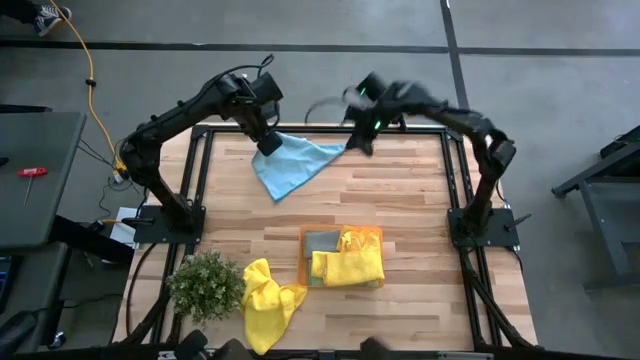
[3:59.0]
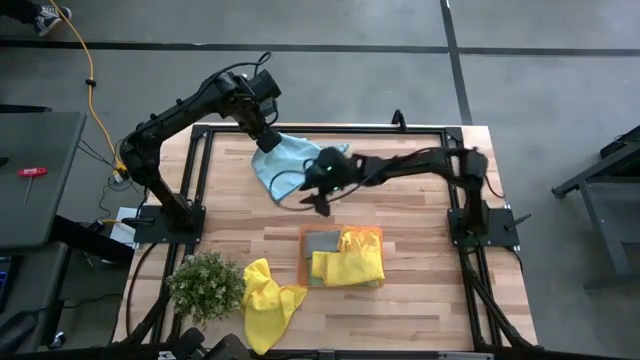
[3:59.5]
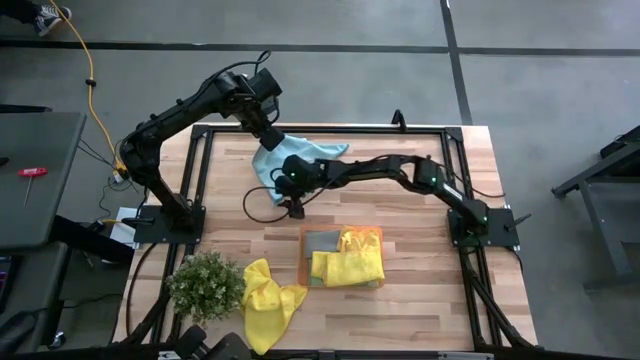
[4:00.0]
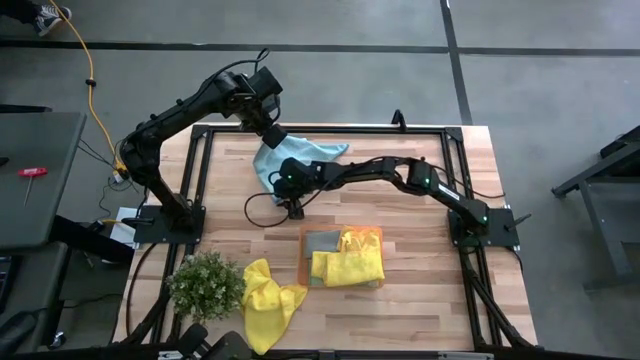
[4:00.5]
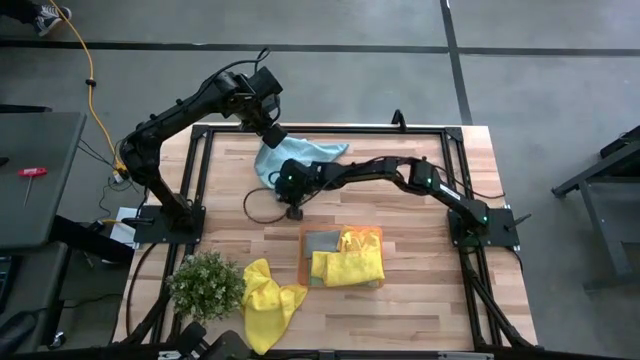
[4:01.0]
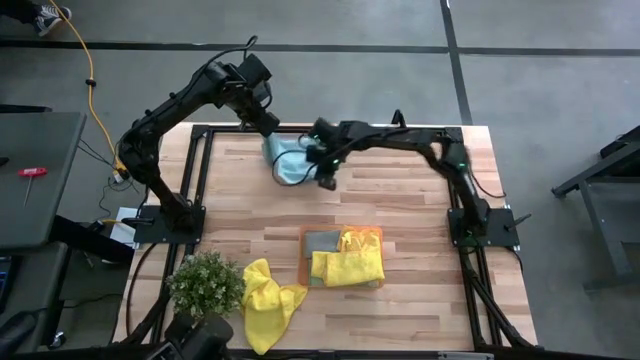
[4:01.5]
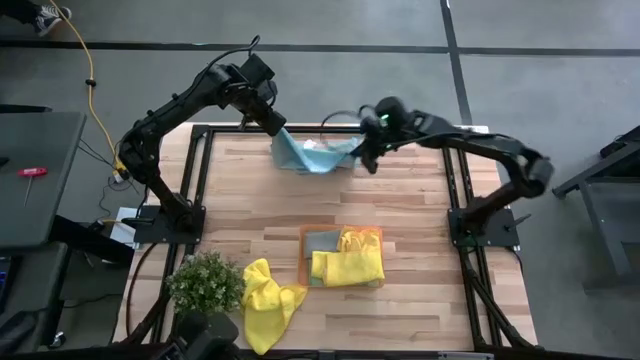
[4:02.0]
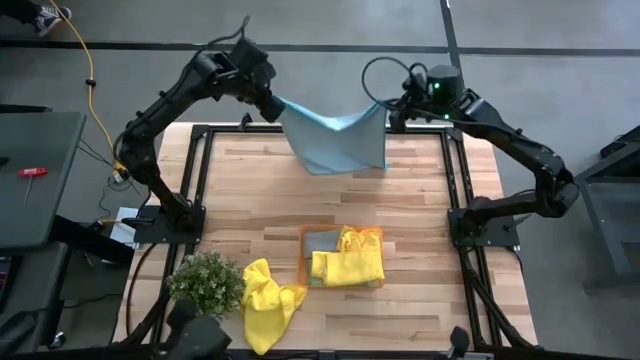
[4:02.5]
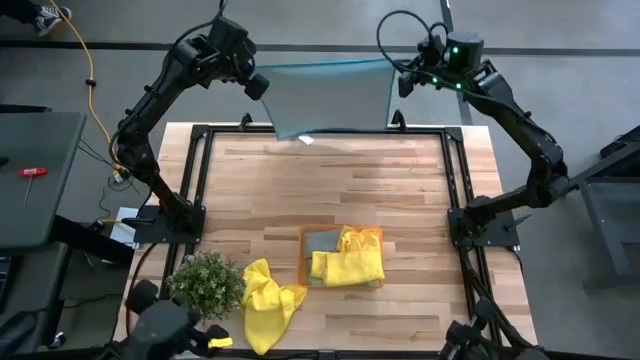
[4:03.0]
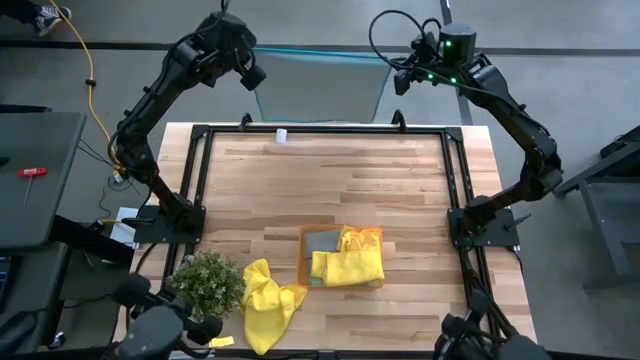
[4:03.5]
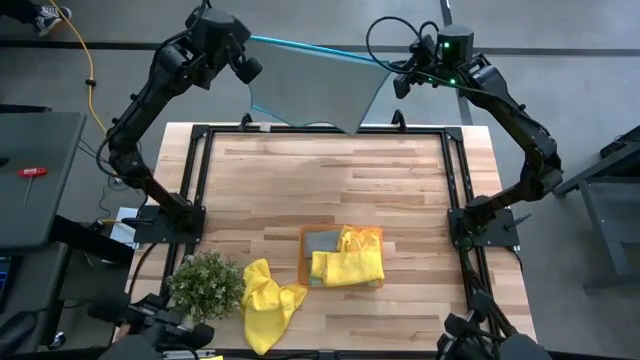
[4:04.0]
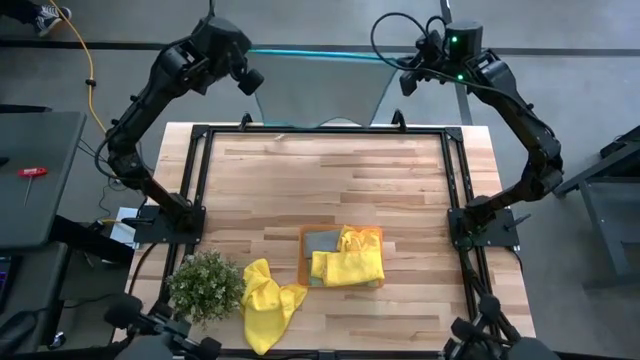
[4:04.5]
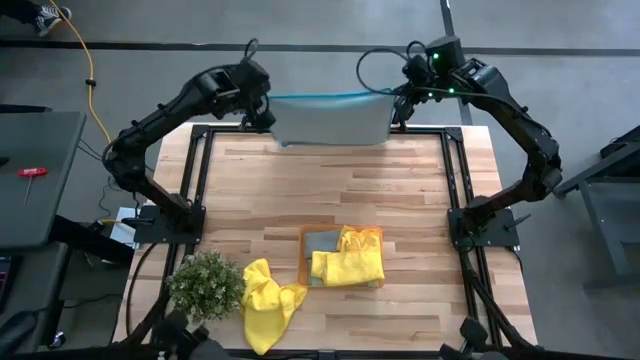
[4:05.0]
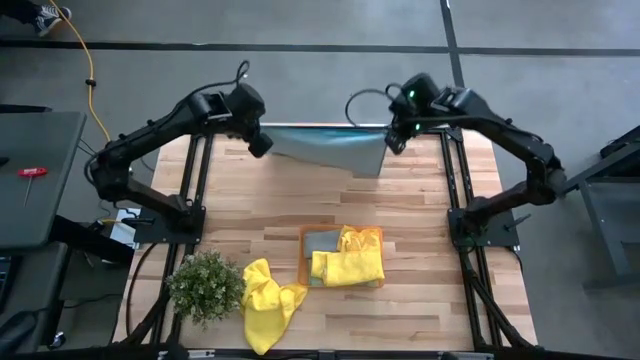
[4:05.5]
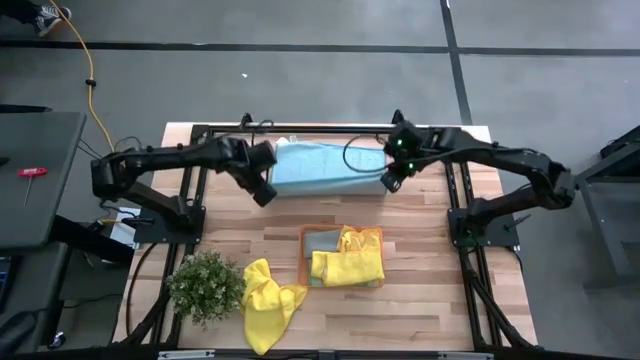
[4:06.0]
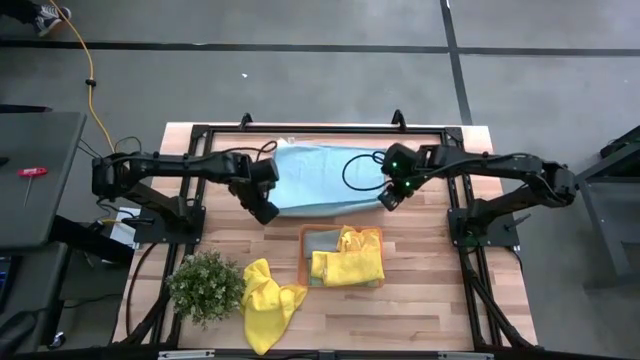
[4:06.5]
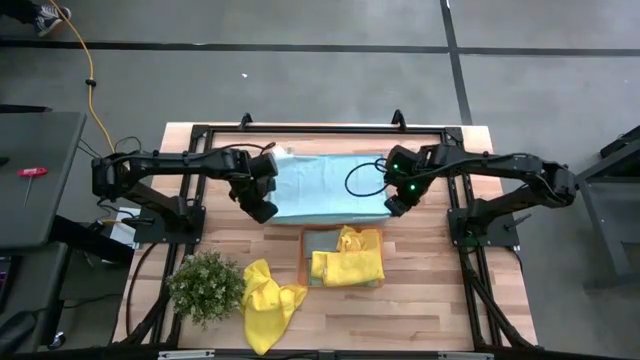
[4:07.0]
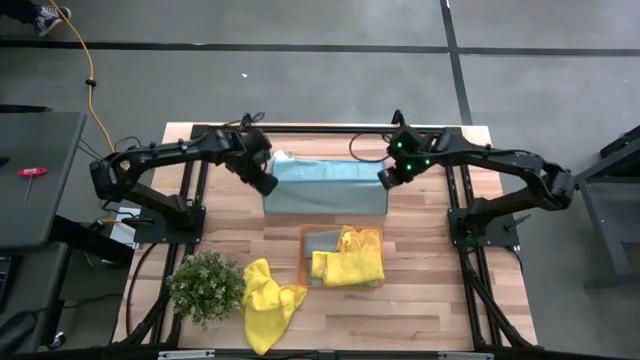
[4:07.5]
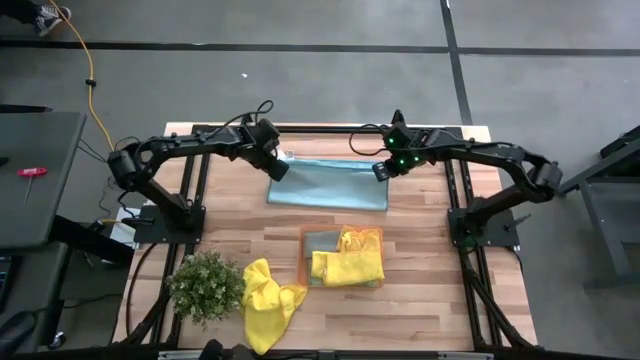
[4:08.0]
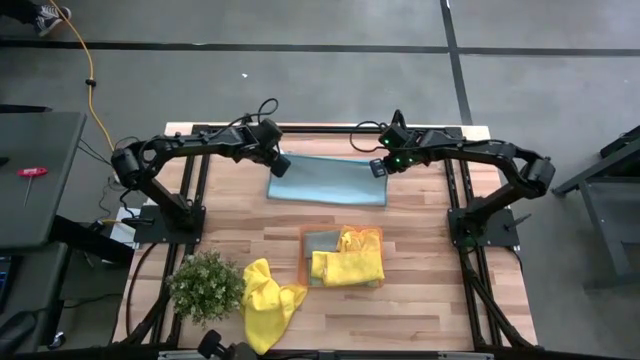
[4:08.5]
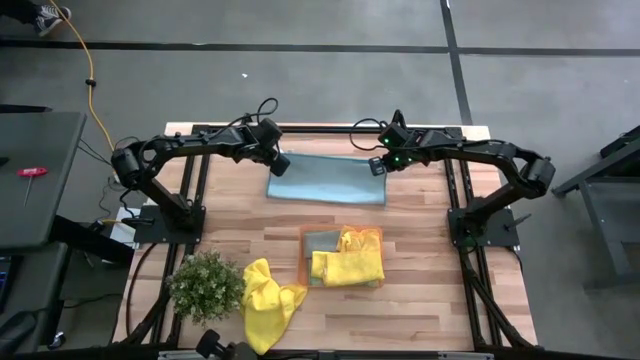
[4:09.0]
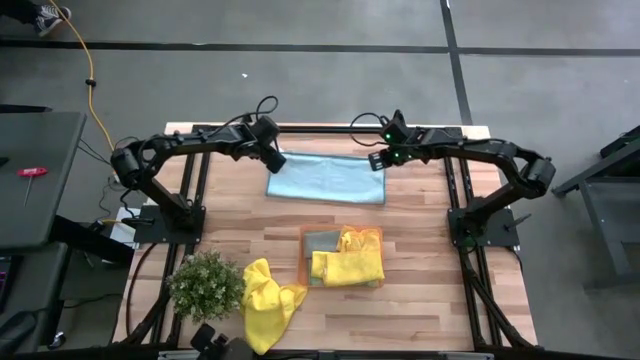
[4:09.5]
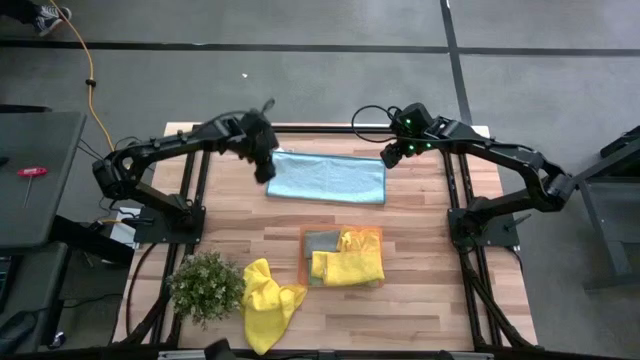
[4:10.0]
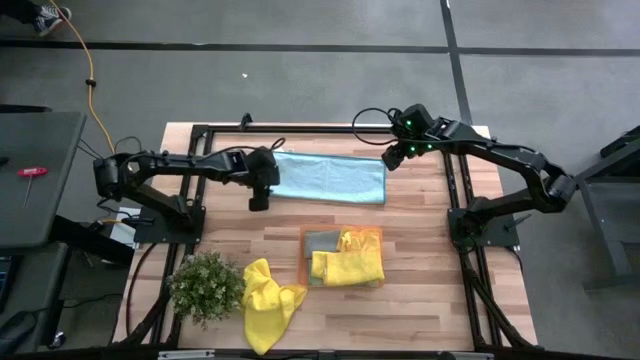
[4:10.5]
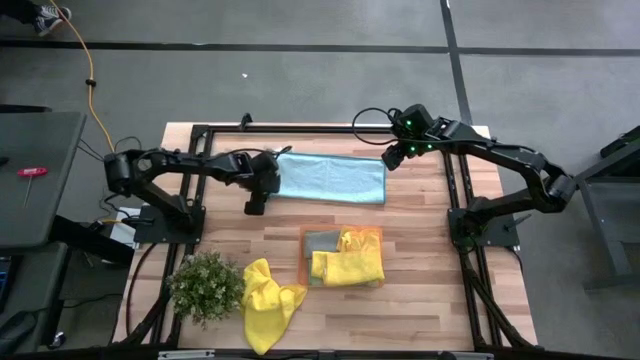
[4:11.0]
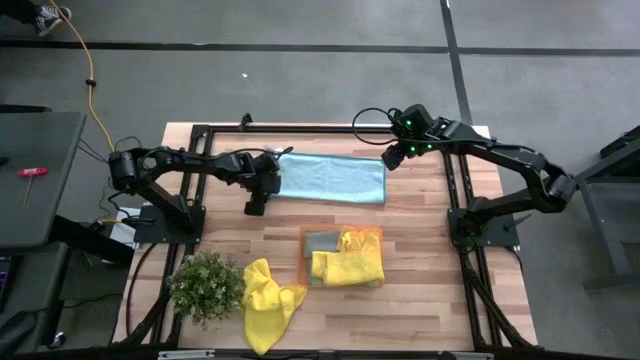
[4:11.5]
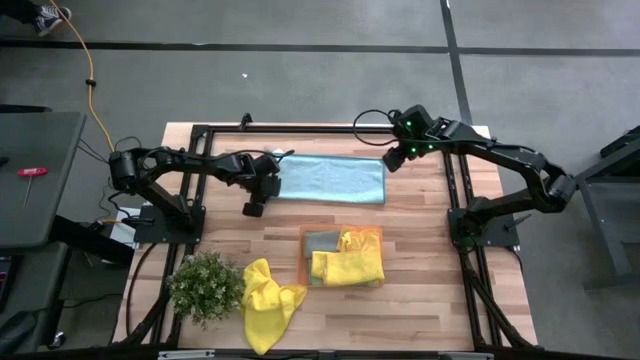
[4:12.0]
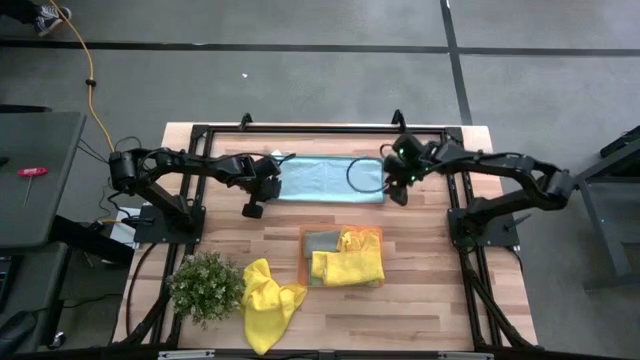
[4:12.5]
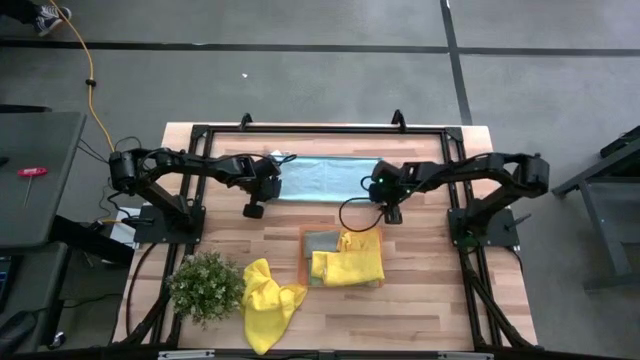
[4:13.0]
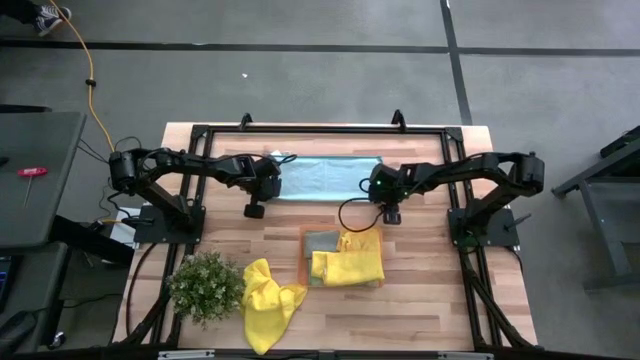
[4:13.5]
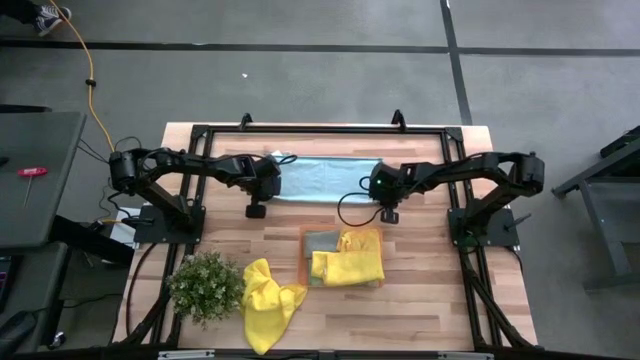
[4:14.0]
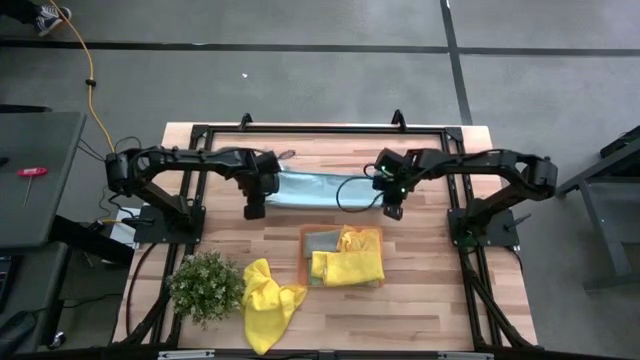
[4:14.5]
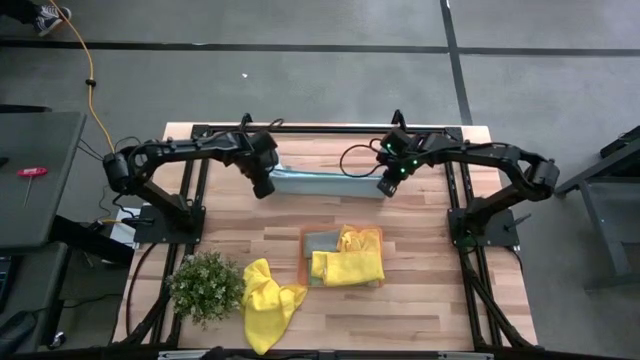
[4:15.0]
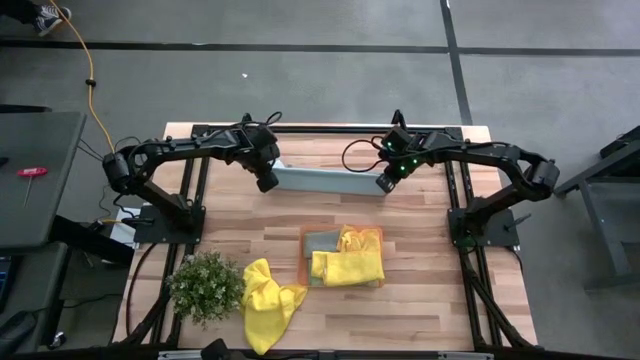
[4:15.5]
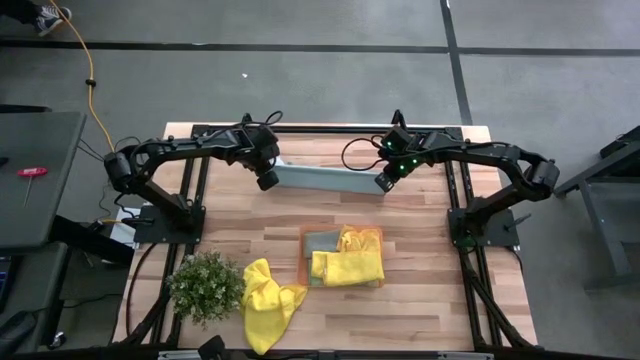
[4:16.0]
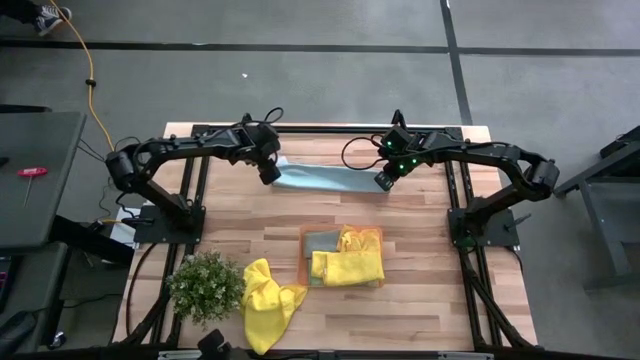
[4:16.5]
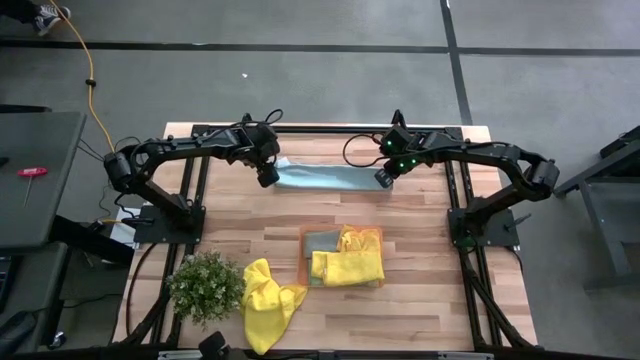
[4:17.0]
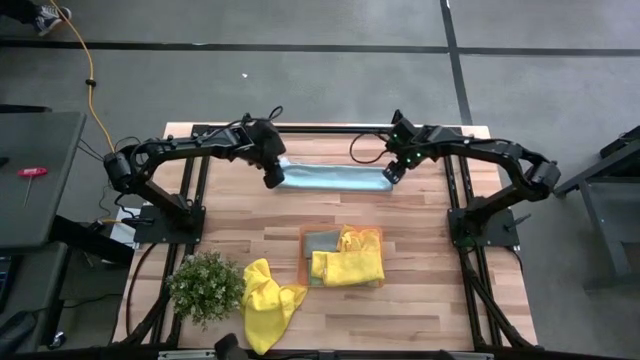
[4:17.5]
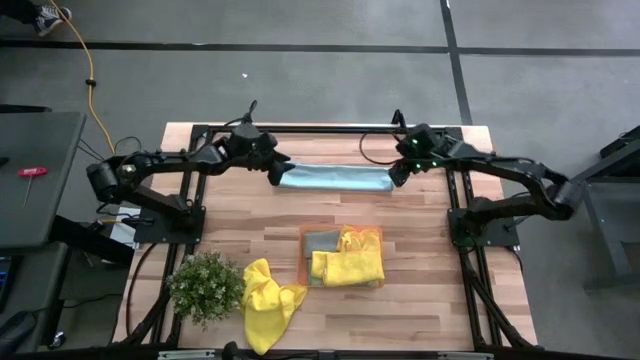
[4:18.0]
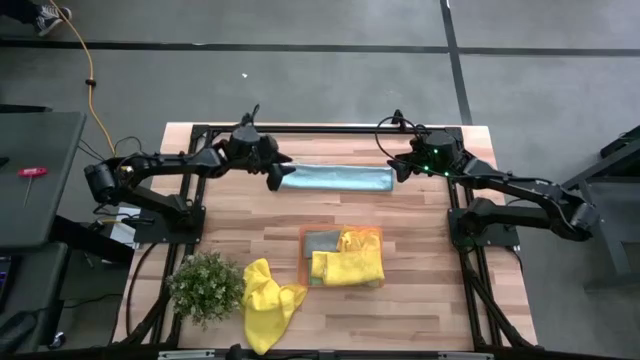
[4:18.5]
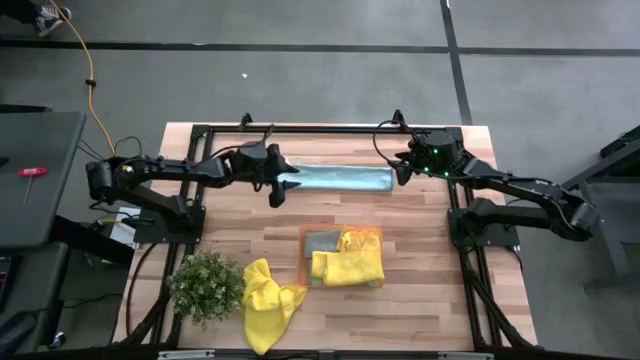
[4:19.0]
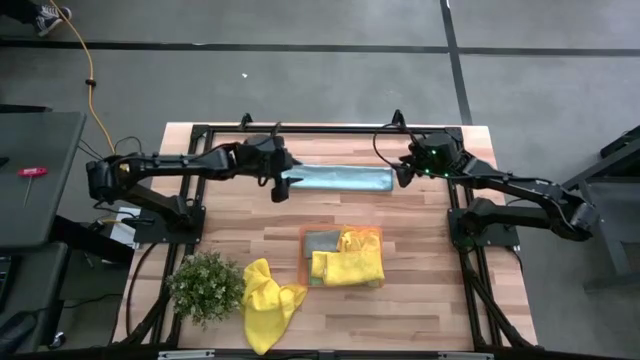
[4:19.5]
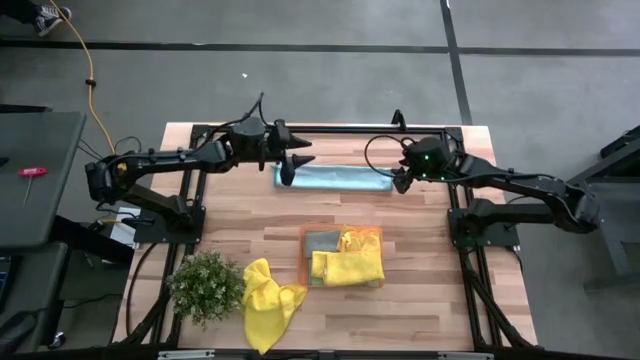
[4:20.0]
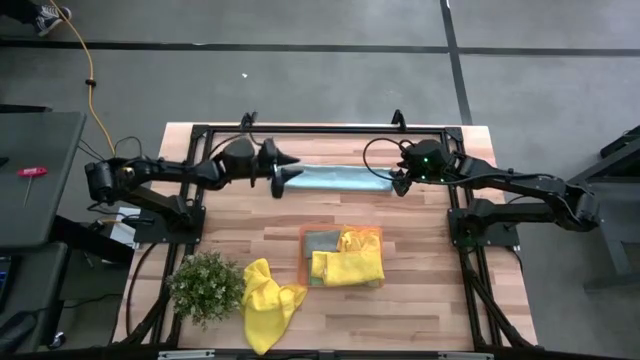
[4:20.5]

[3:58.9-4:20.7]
Task: Fold microfiber towels
Fold the blue microfiber towel
